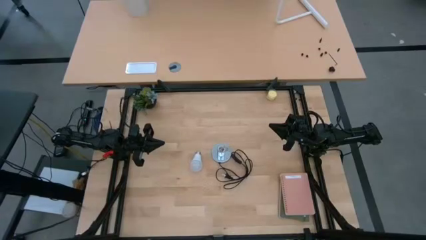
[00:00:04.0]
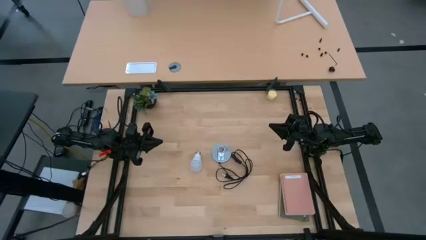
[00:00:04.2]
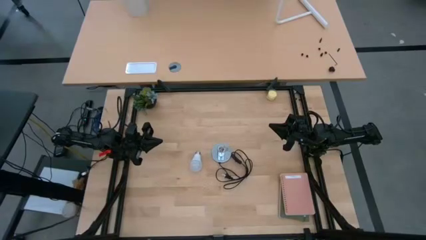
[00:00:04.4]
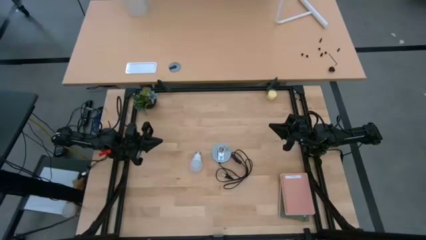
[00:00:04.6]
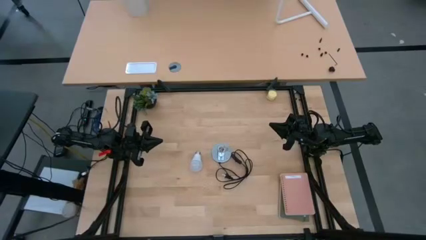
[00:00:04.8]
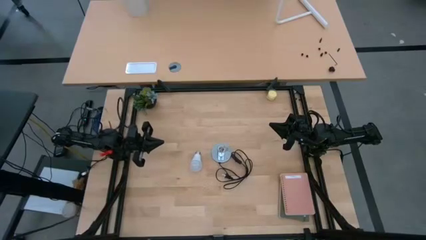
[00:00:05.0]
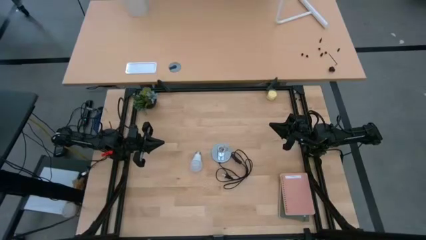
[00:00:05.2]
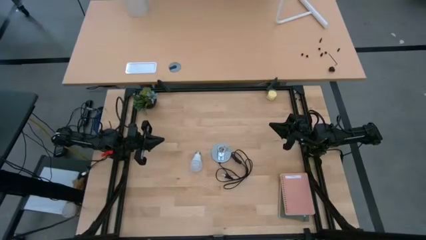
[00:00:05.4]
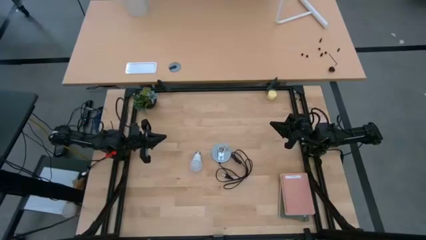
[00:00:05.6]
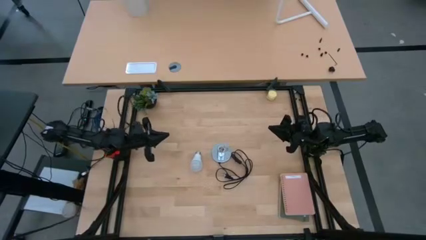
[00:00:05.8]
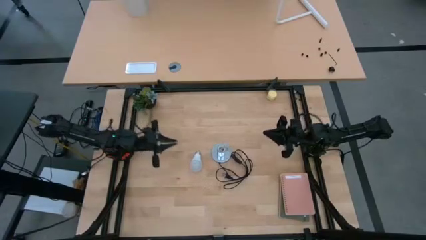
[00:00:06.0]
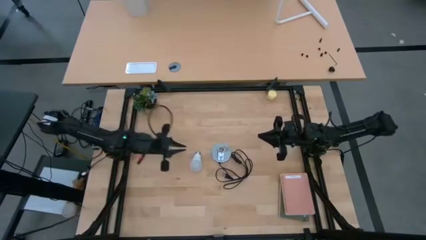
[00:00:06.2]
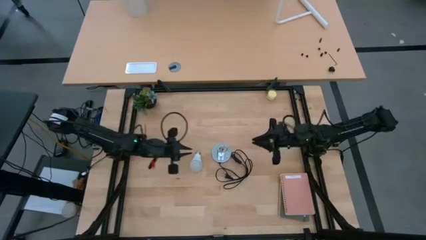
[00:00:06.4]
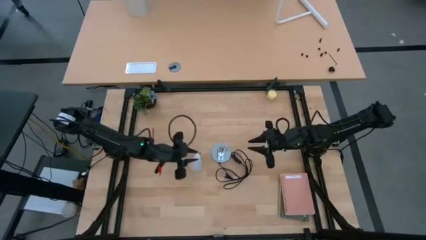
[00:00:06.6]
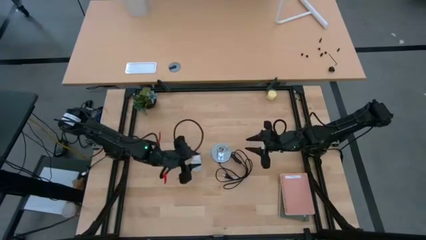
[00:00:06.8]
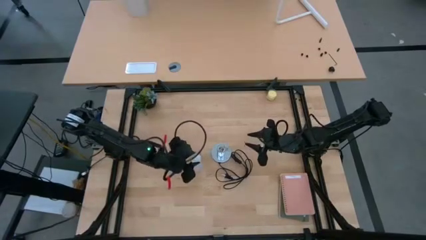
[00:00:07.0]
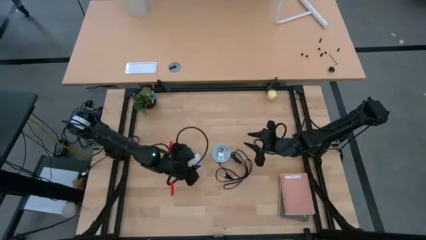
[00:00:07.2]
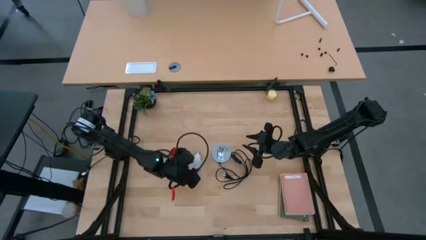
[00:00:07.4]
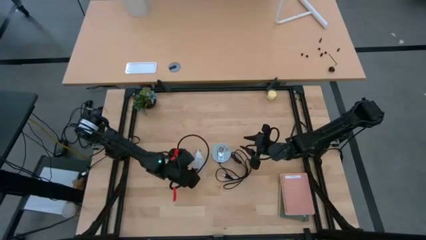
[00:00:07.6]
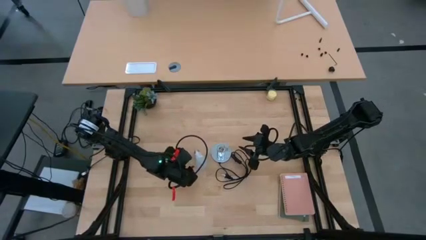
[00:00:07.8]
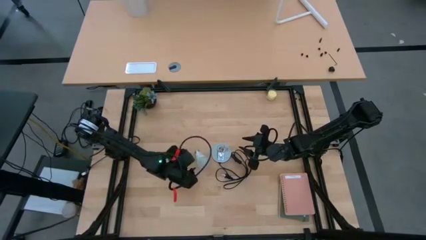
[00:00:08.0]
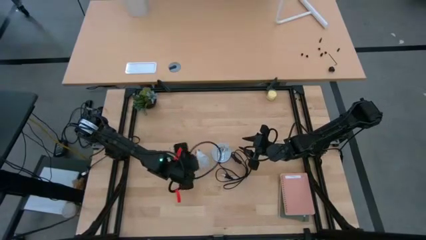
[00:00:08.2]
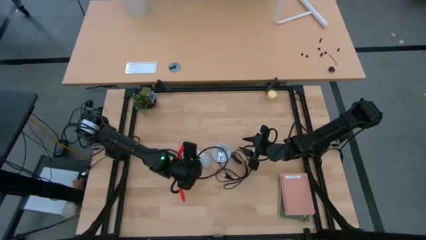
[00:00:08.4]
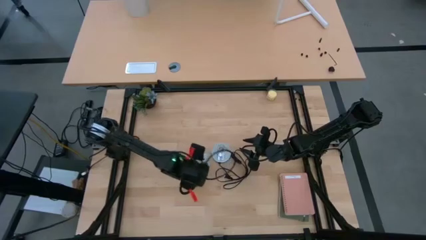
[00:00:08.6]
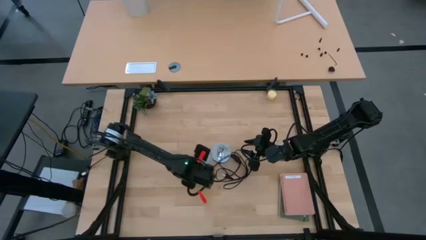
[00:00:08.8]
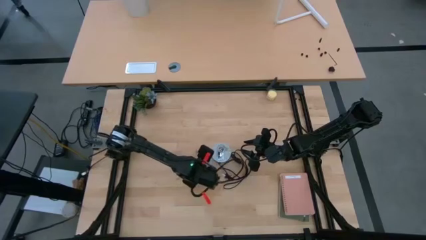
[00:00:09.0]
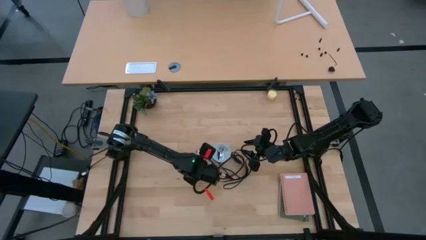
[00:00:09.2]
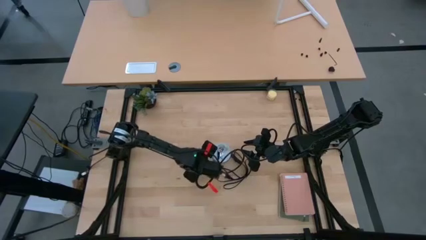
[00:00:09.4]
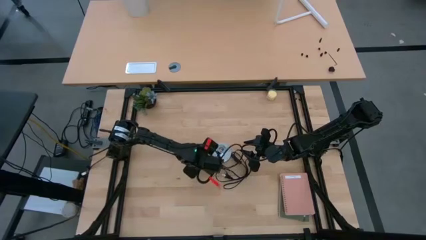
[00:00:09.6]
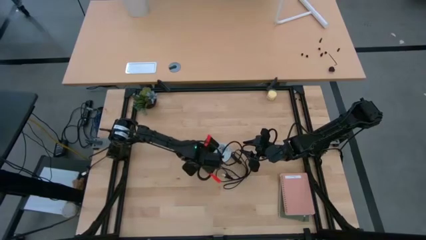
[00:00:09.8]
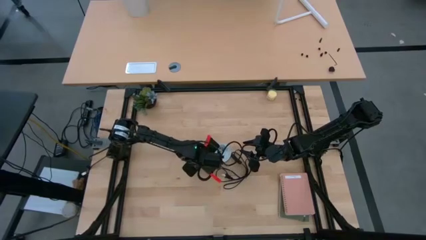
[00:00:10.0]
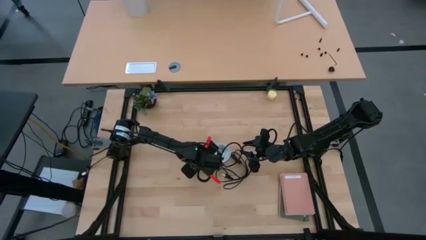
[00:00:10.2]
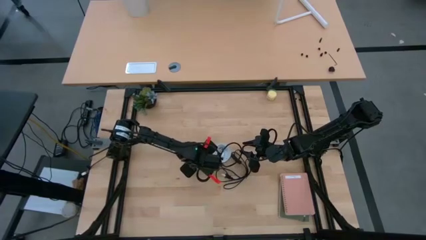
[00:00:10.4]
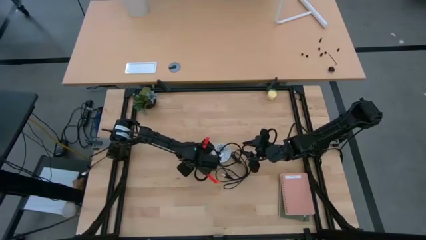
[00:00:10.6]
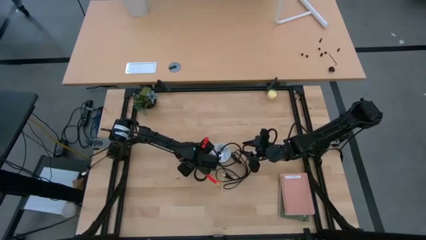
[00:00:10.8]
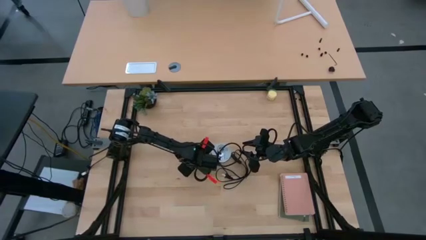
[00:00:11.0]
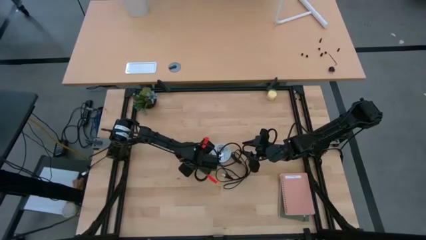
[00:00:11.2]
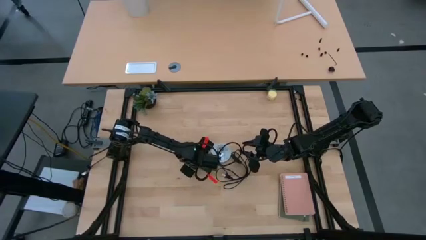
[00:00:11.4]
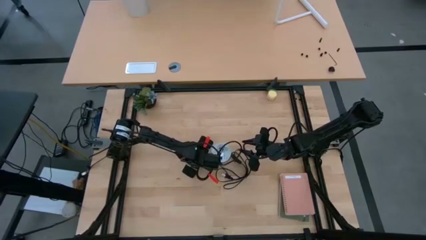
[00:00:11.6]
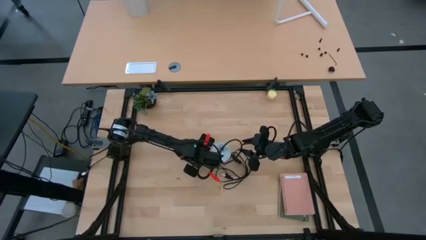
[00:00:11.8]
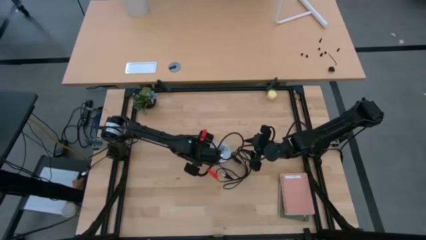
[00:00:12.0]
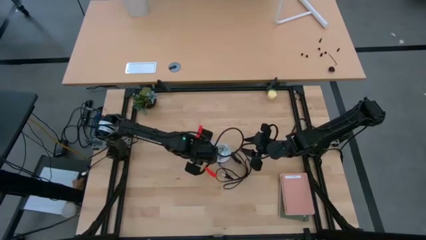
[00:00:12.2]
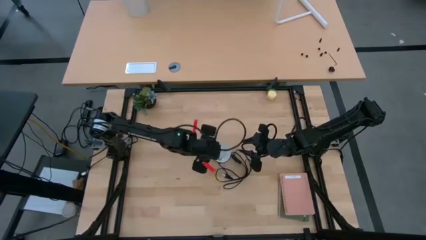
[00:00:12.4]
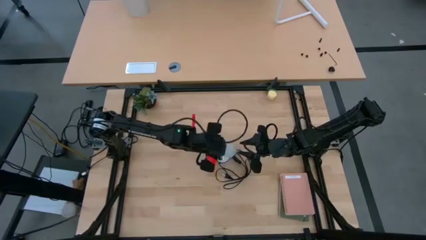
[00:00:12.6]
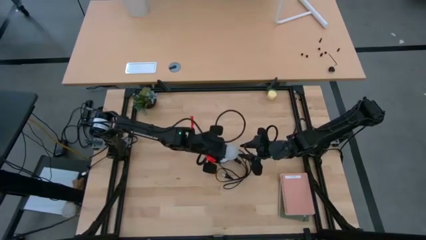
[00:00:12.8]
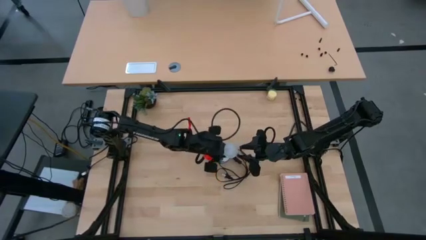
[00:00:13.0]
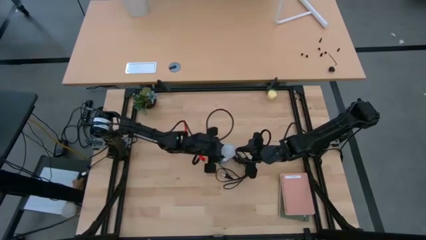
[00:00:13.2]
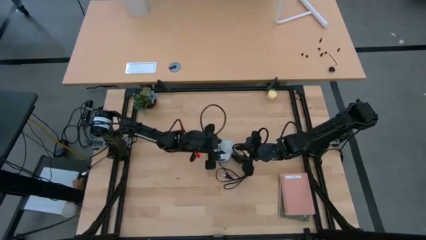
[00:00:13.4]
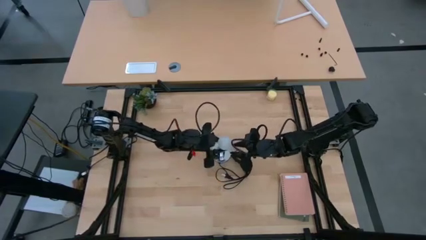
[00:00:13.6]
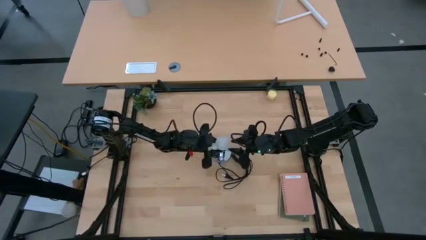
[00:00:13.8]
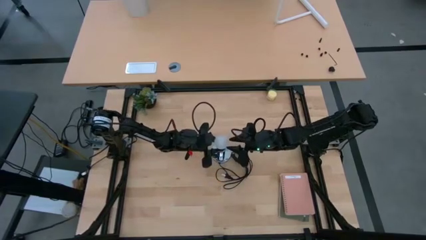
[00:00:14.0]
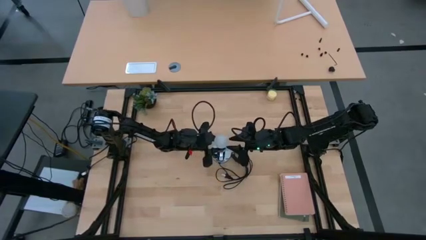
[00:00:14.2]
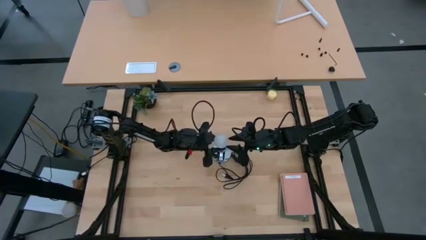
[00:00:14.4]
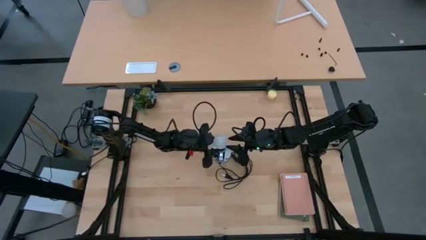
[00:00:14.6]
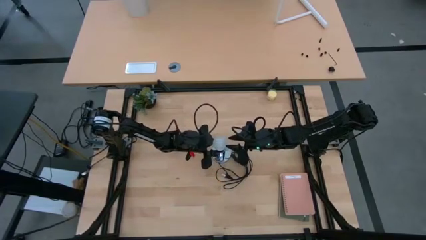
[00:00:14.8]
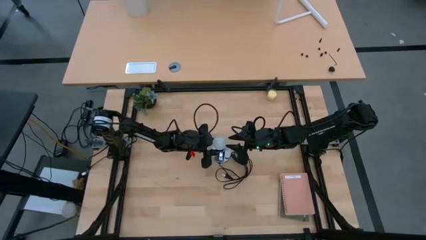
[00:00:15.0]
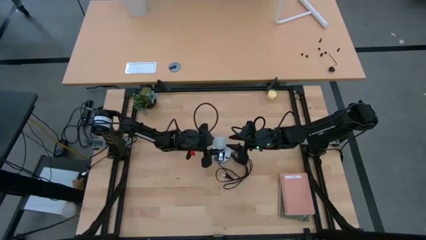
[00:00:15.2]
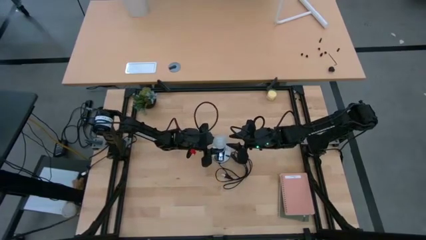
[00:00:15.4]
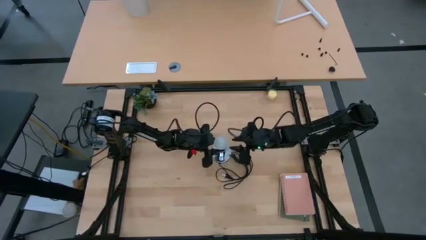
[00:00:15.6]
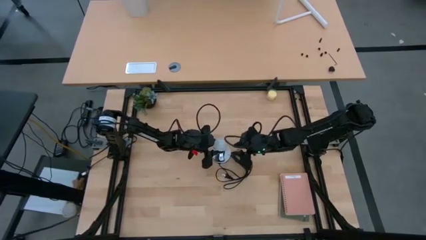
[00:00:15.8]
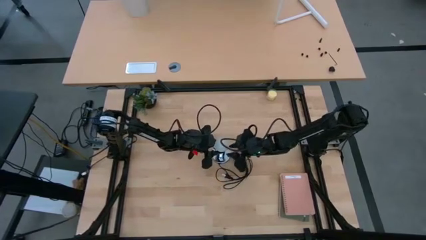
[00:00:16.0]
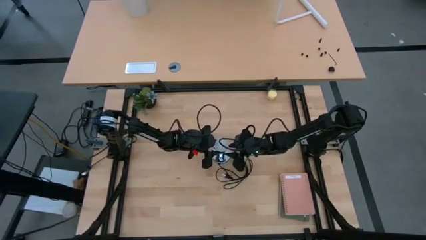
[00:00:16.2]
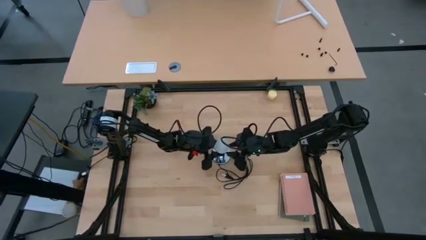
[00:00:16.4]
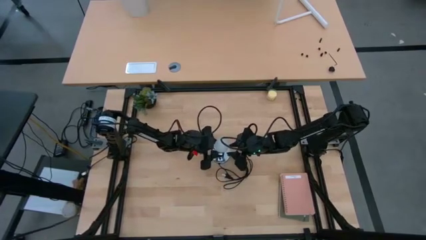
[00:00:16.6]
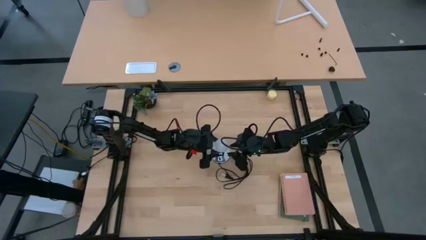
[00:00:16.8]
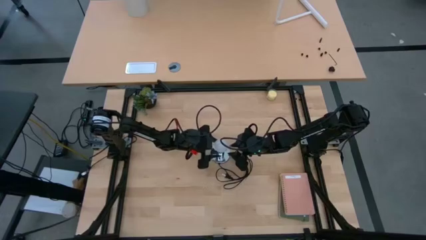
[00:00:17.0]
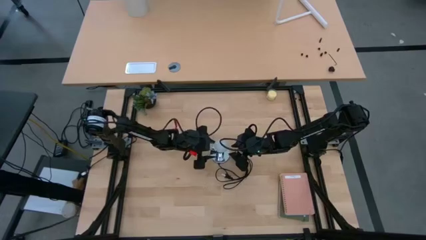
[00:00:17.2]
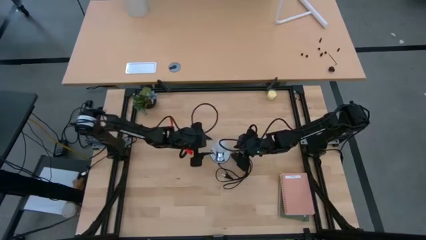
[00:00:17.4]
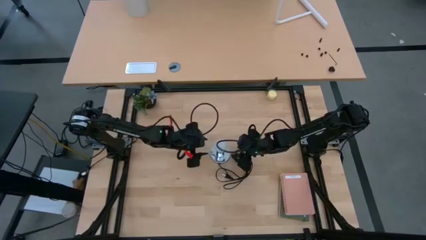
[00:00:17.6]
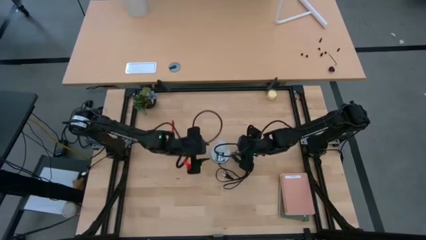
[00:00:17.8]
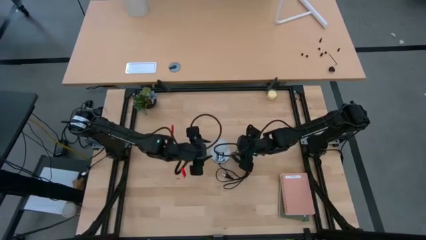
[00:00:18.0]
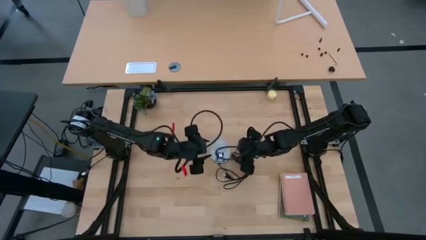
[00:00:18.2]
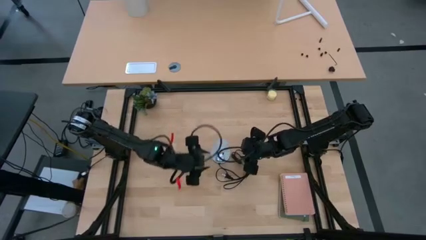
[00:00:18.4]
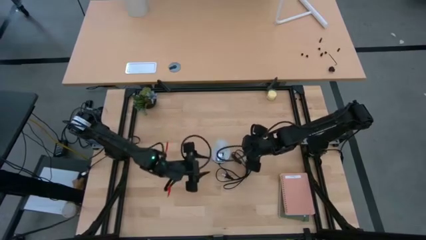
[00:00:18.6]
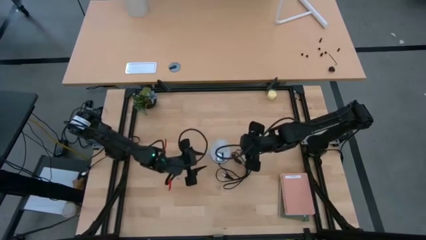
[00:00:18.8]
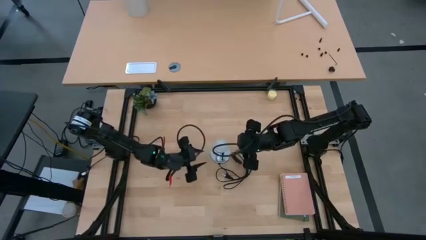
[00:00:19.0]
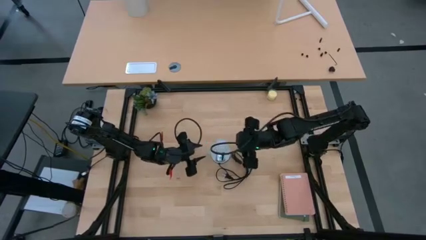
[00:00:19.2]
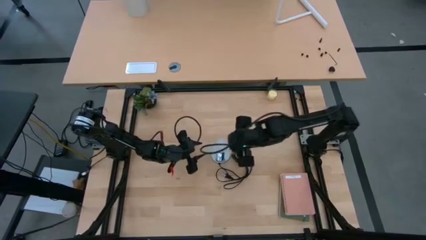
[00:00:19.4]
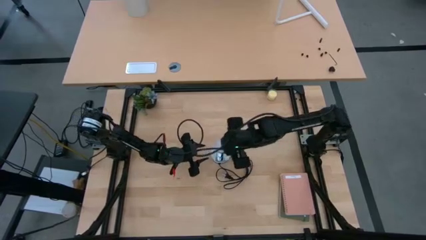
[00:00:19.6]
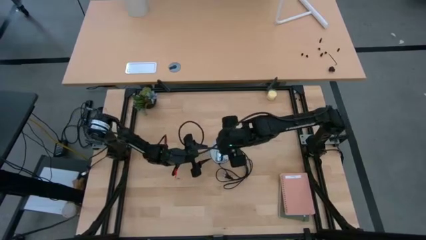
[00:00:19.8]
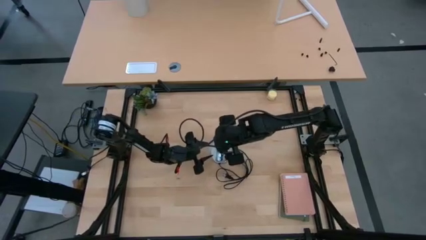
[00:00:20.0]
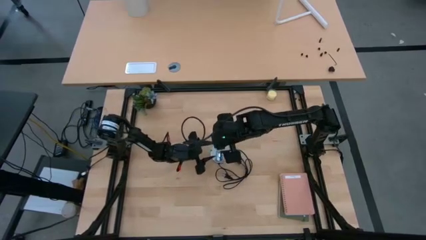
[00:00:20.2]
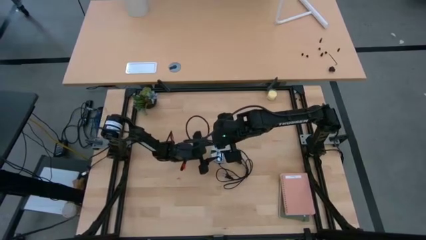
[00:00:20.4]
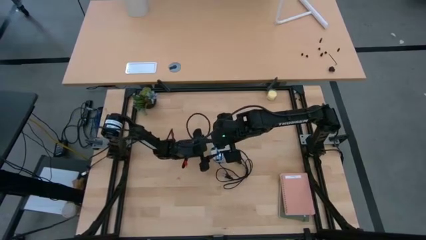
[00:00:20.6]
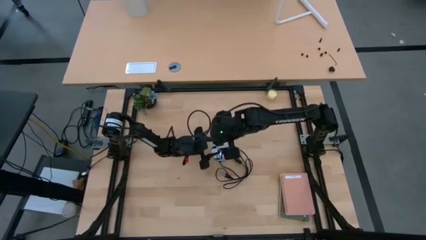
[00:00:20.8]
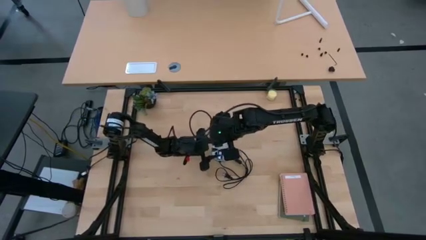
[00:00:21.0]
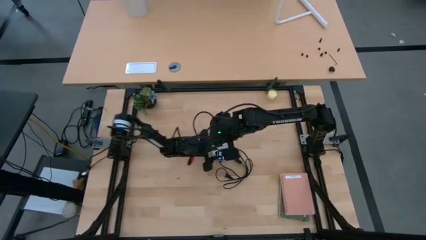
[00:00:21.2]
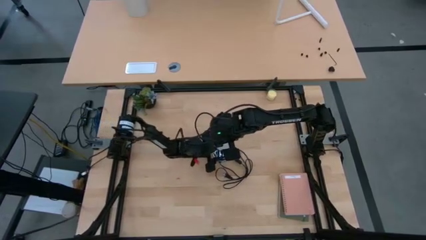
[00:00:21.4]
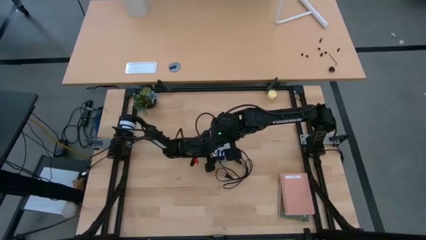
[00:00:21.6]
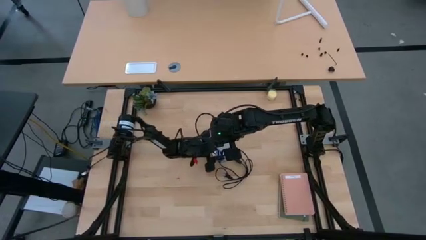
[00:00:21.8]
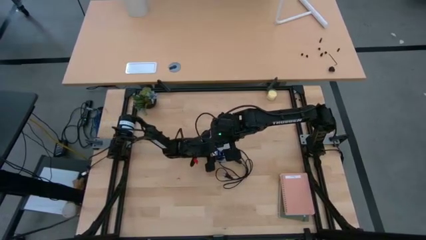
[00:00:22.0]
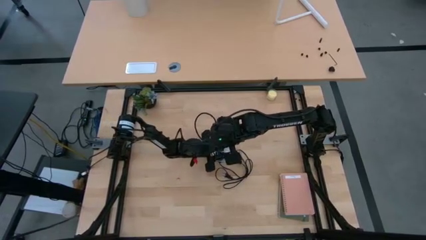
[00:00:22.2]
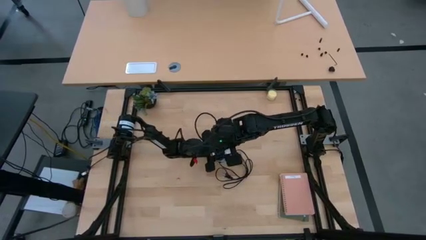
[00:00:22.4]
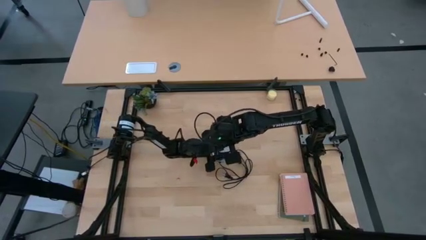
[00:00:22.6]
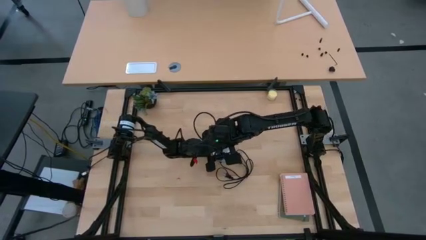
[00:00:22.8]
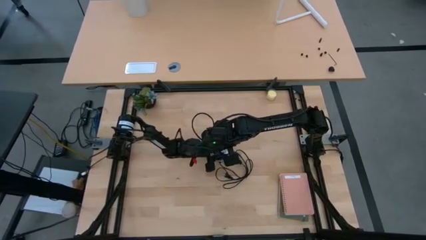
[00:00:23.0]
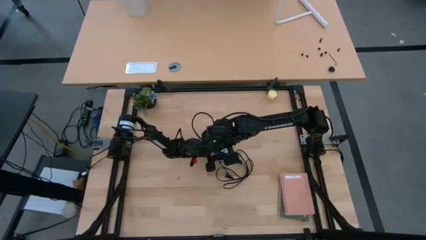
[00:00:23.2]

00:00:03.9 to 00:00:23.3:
Task: Screw lightbulb
Insert the light bulb into the lamp
